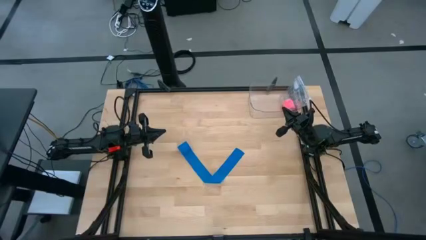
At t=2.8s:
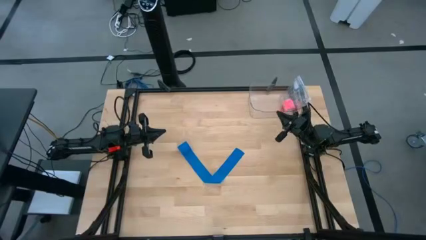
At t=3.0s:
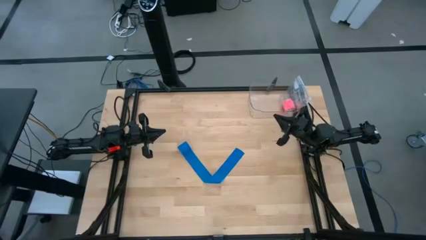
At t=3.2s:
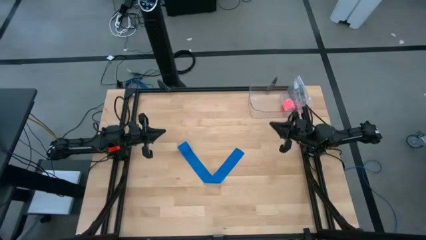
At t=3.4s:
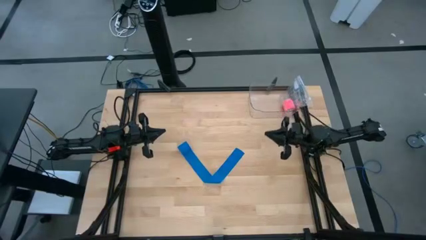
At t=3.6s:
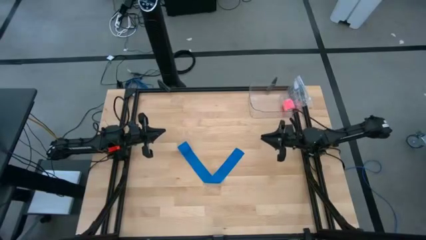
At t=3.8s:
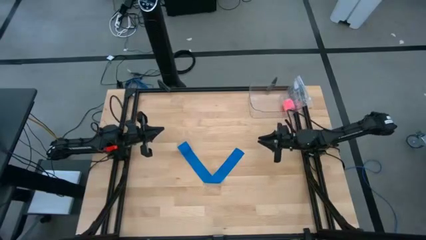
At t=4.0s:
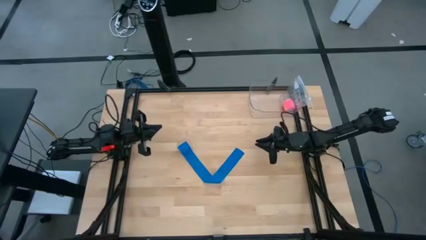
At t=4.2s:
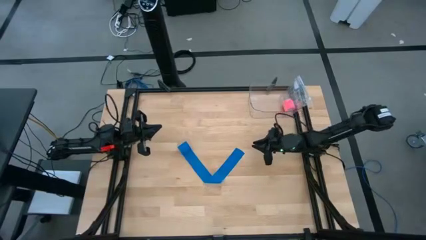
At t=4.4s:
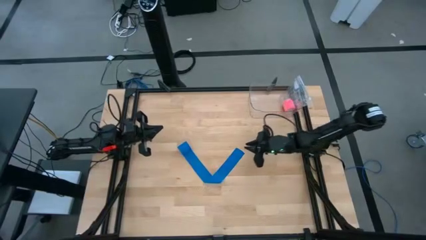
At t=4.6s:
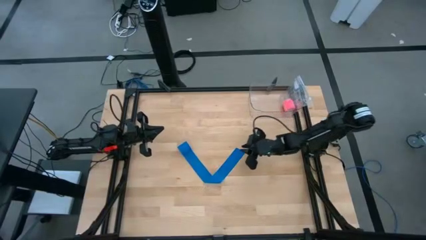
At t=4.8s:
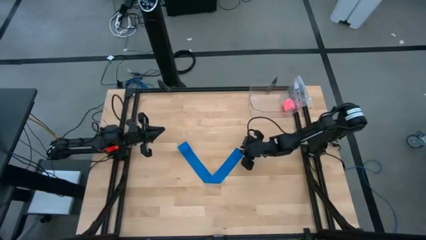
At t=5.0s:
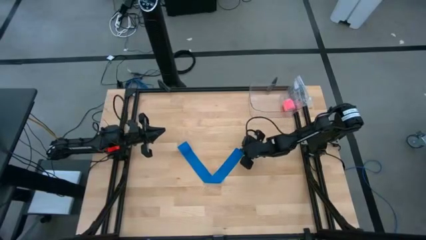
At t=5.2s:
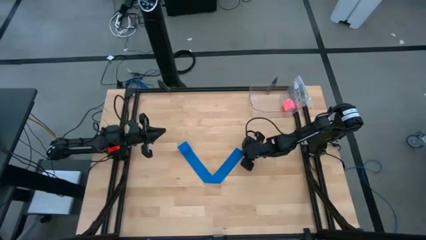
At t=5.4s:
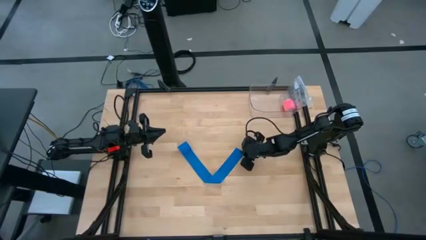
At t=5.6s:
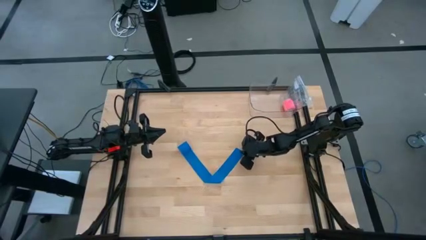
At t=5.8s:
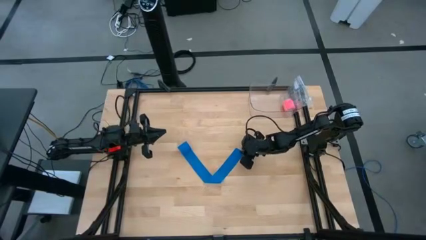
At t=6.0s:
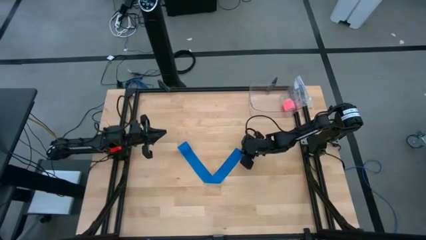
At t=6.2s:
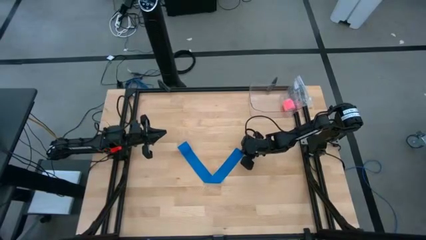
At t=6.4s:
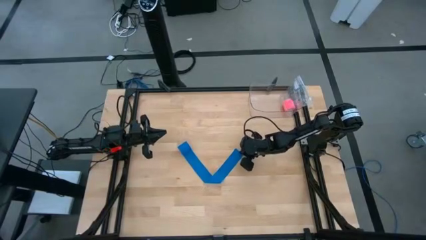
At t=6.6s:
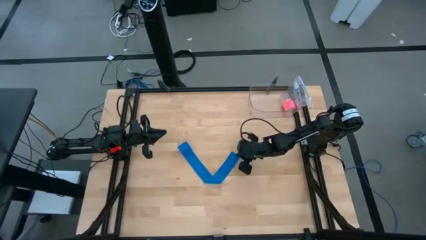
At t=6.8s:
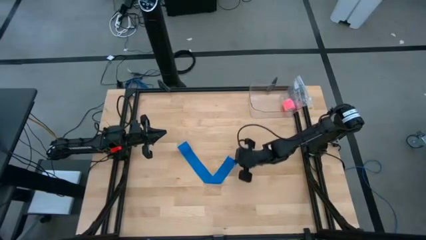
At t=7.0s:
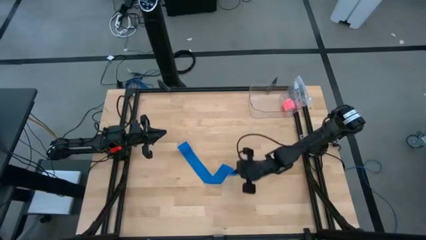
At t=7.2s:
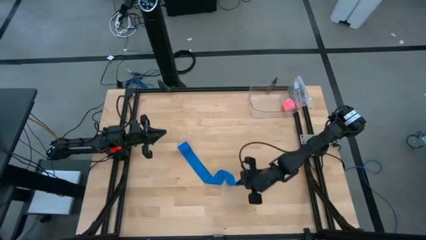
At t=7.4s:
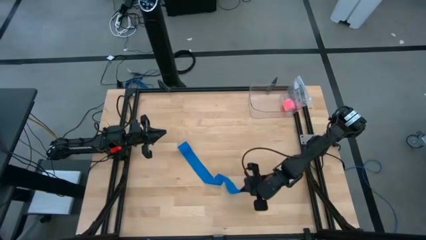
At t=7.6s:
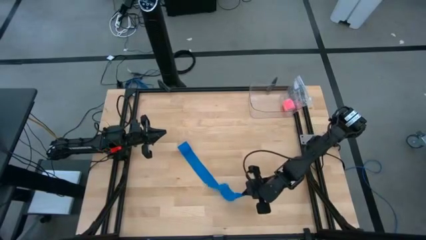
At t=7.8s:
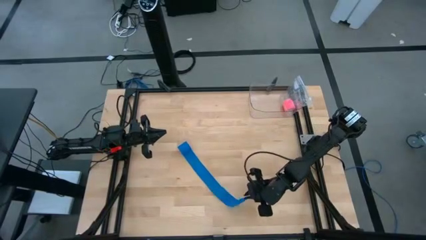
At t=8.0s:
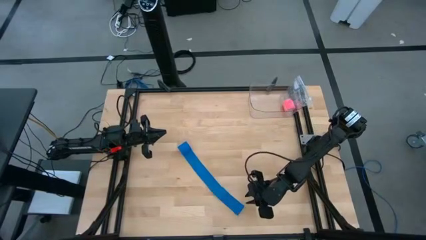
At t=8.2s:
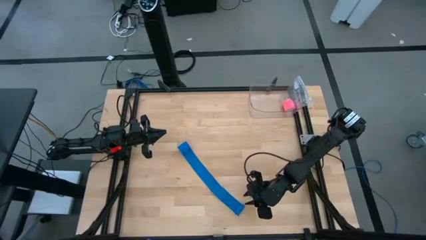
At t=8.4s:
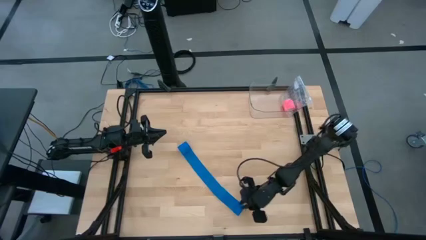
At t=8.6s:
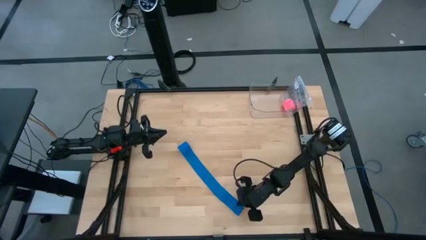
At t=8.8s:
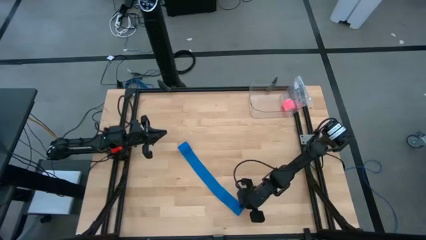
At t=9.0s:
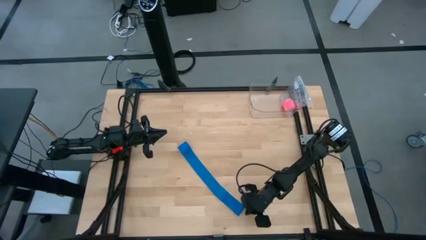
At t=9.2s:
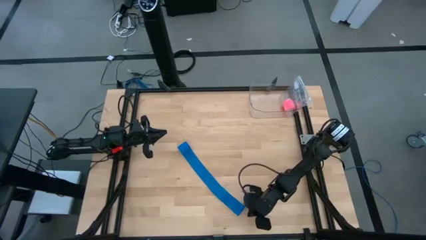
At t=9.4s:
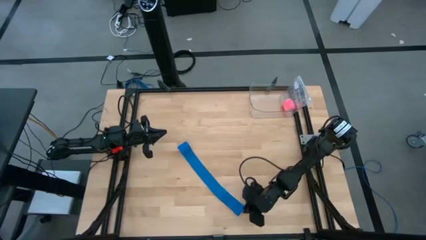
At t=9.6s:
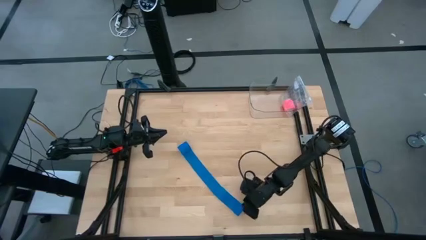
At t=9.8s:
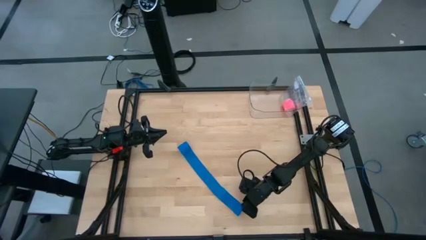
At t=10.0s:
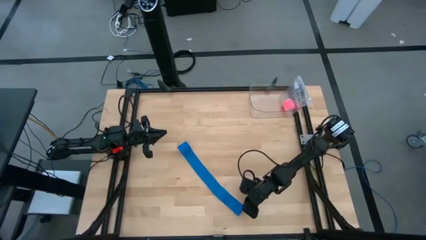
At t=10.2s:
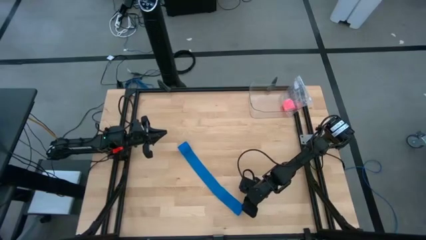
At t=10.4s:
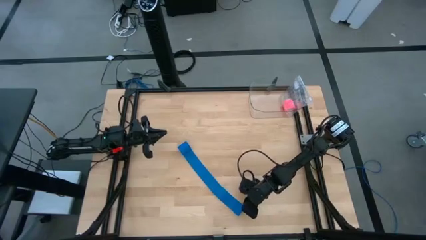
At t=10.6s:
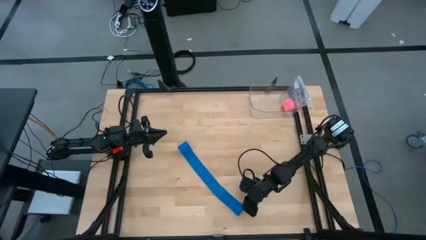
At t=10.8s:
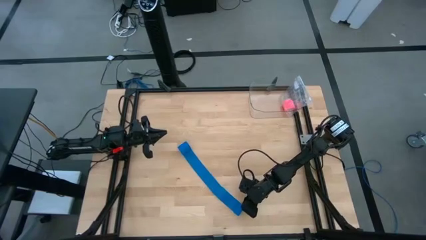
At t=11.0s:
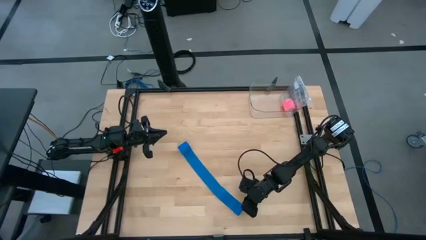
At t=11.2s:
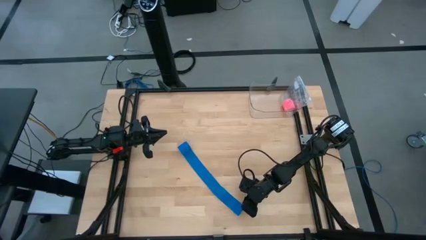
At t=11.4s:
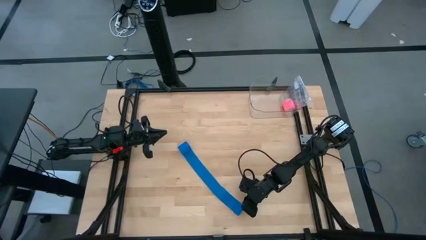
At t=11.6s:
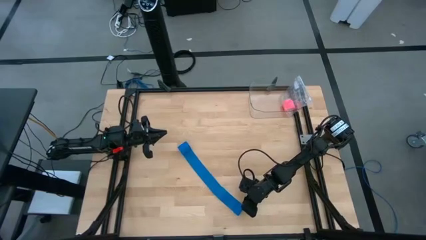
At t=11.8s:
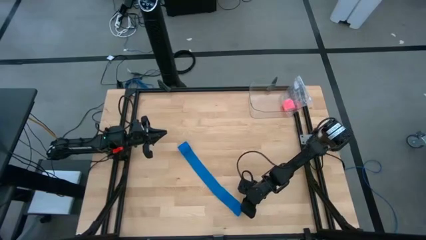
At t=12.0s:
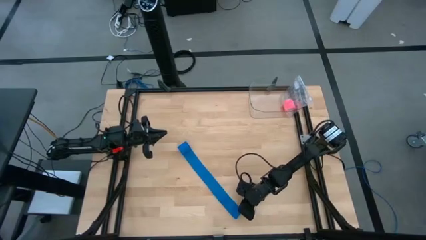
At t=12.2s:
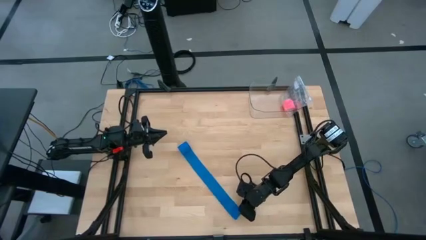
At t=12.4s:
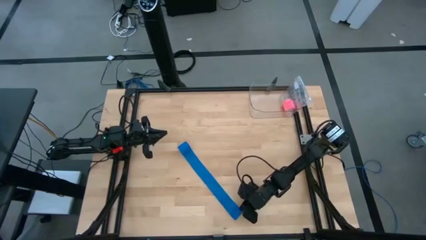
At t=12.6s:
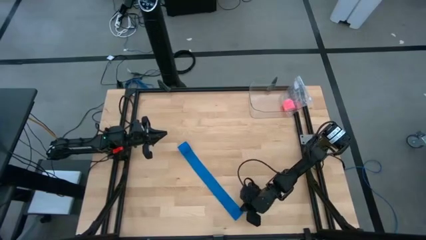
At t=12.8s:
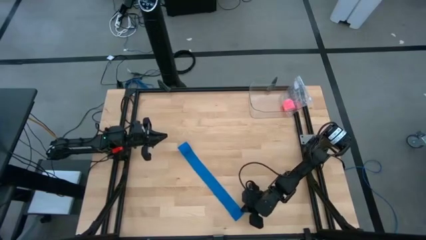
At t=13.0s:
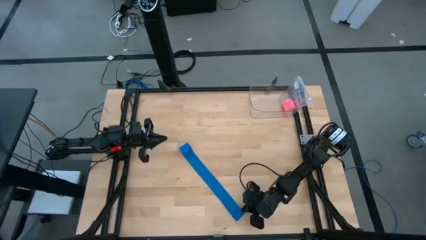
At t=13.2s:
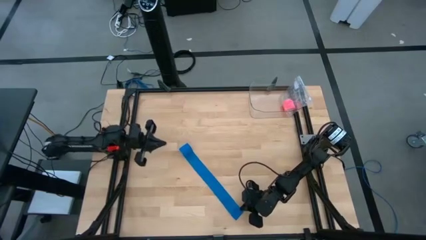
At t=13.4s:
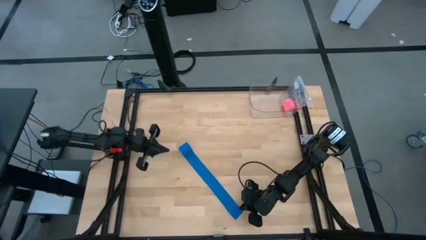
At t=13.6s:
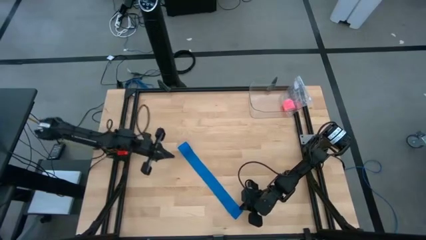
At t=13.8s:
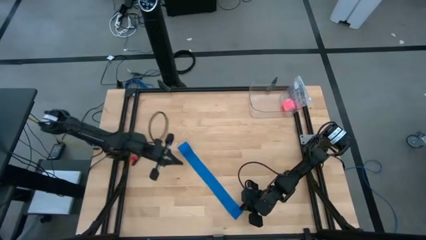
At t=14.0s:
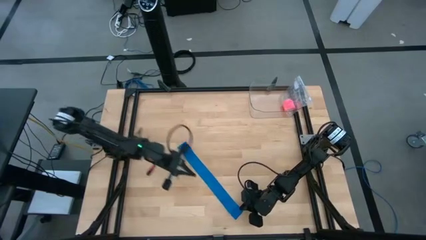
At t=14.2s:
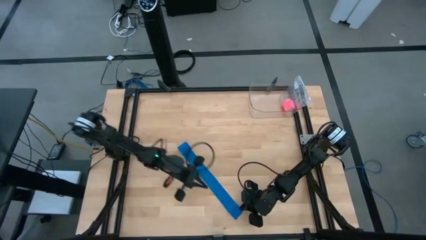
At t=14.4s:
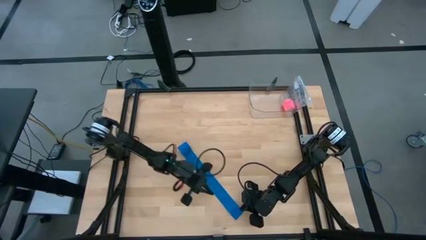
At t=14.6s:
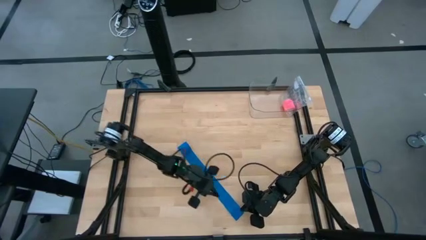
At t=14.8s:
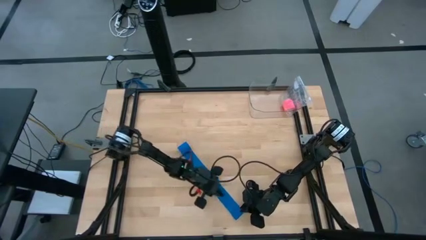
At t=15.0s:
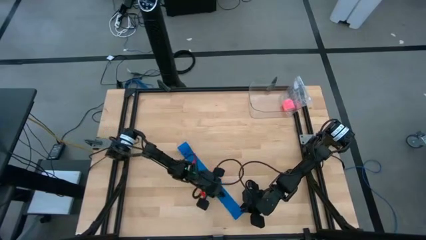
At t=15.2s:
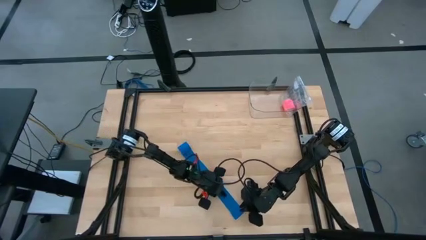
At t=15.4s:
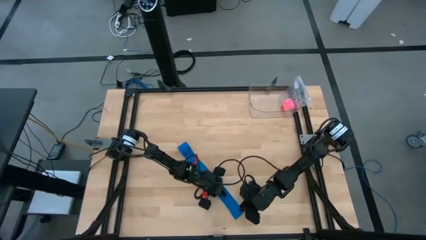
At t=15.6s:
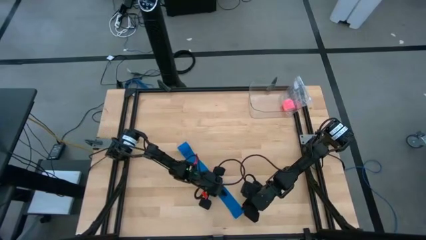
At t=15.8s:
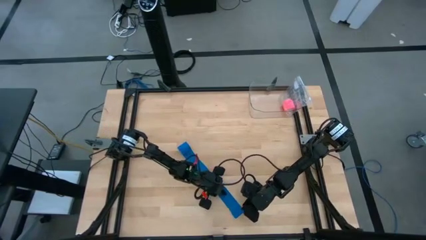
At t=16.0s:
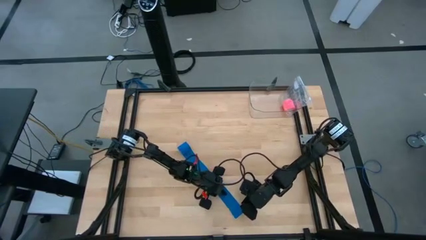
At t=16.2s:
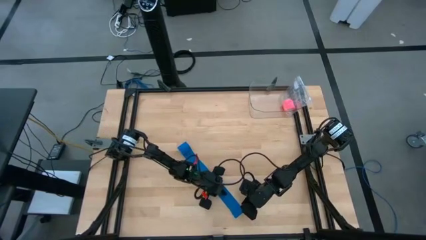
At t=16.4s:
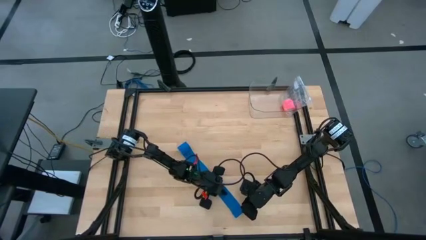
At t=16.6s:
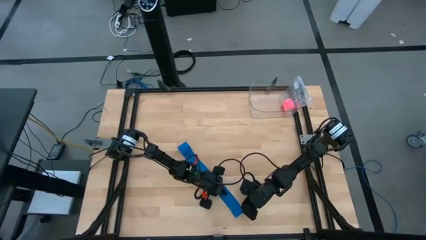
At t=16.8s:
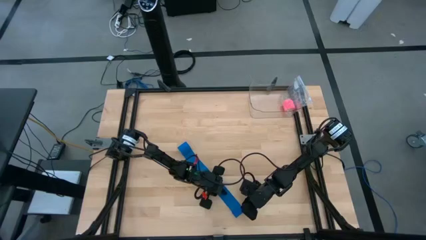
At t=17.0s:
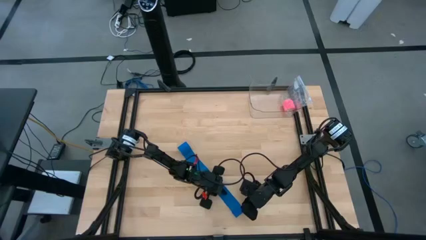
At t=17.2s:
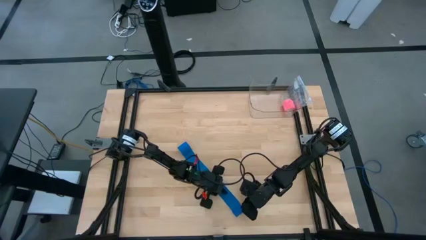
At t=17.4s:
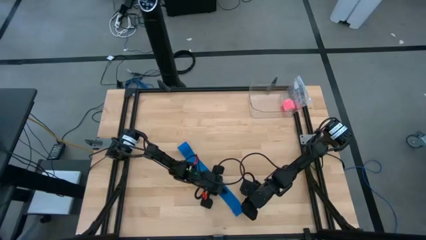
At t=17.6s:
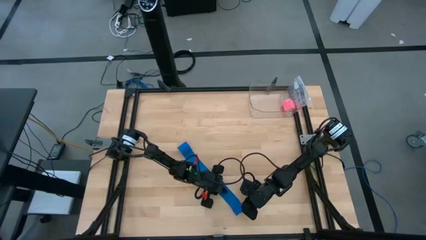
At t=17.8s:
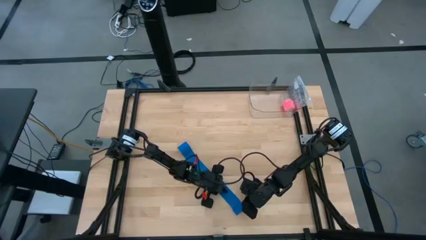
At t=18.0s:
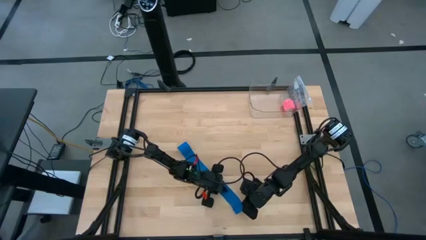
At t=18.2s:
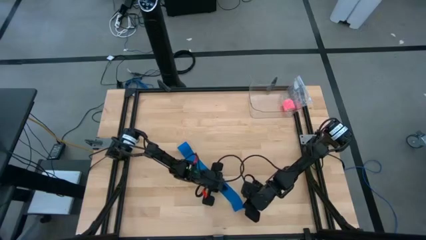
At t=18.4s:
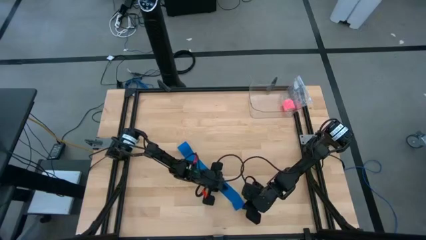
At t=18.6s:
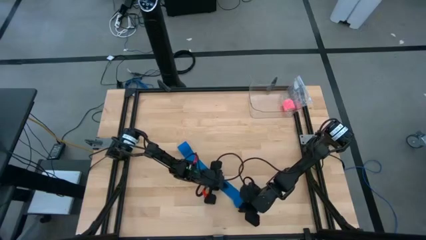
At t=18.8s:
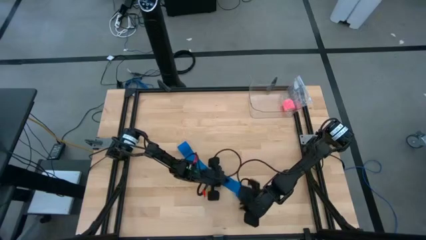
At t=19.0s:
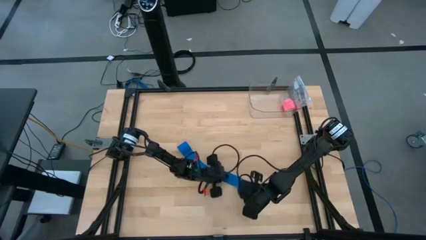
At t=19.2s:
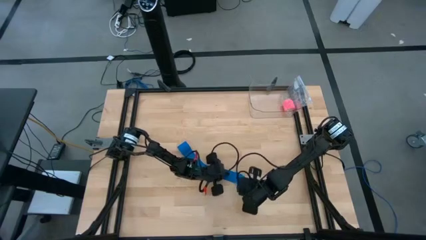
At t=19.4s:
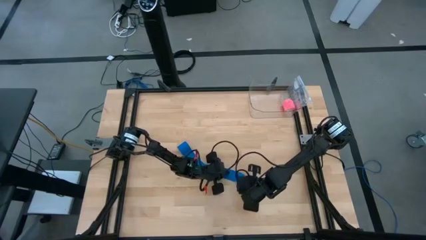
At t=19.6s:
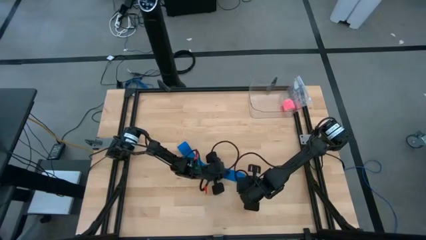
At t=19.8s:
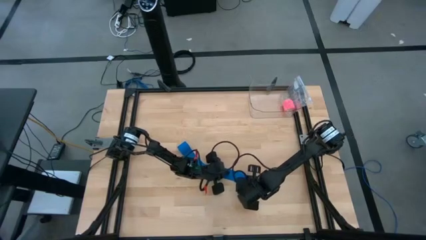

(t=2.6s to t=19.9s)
Task: Roll bandage
Roll the blue bandage
